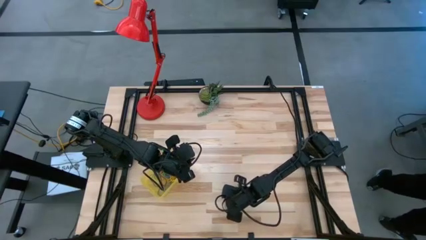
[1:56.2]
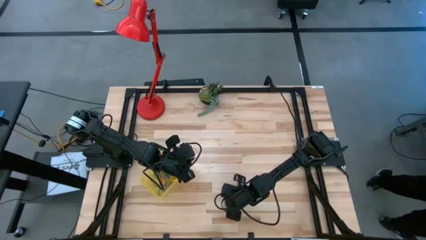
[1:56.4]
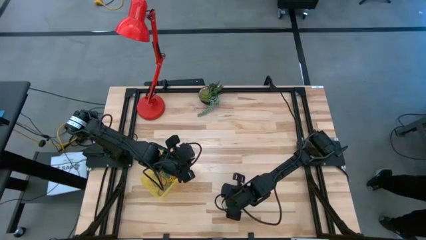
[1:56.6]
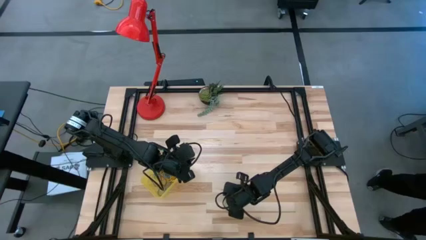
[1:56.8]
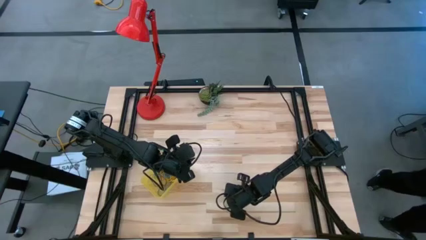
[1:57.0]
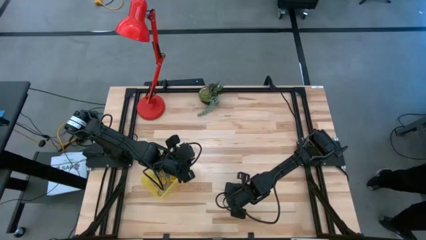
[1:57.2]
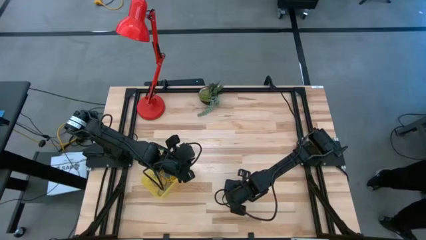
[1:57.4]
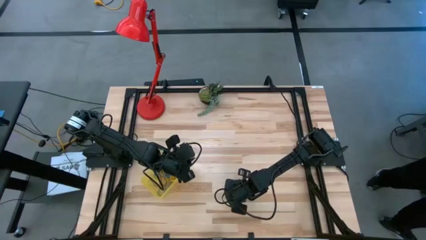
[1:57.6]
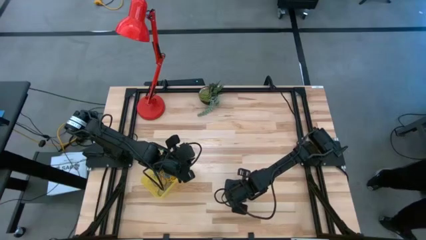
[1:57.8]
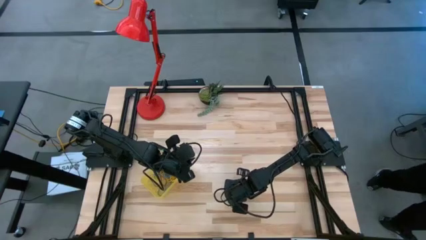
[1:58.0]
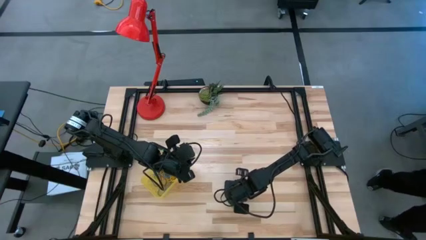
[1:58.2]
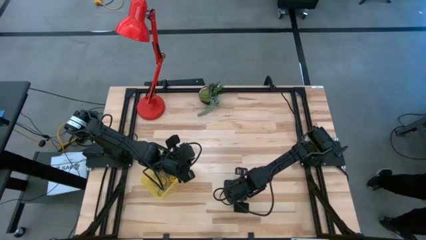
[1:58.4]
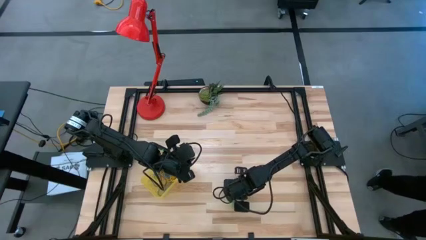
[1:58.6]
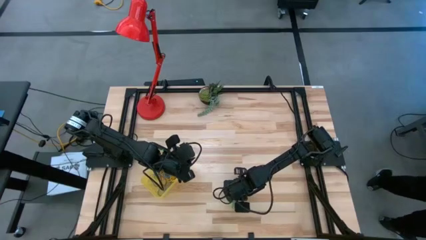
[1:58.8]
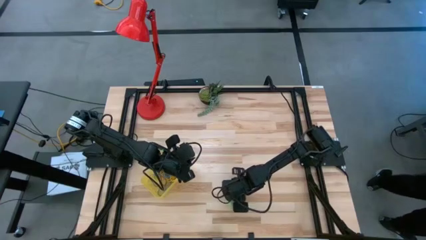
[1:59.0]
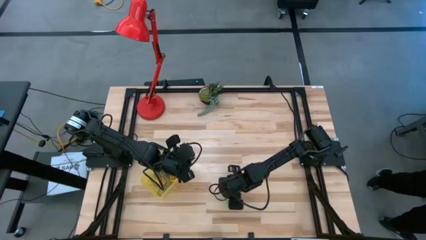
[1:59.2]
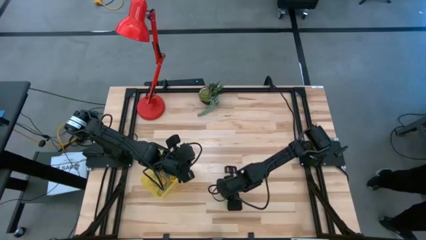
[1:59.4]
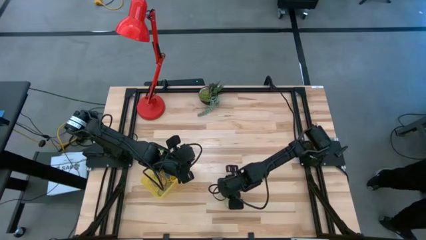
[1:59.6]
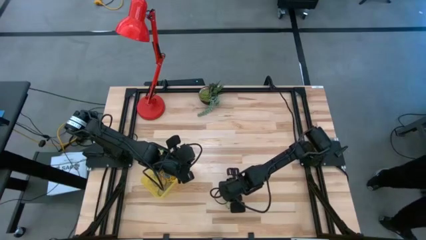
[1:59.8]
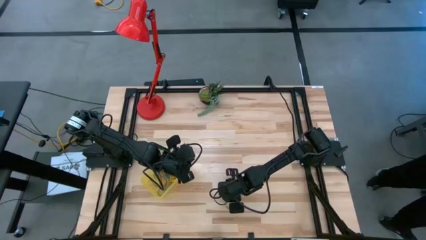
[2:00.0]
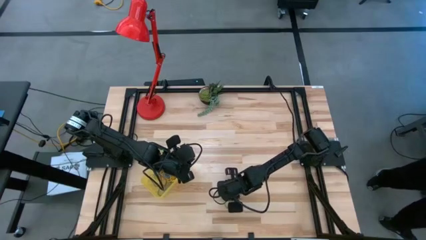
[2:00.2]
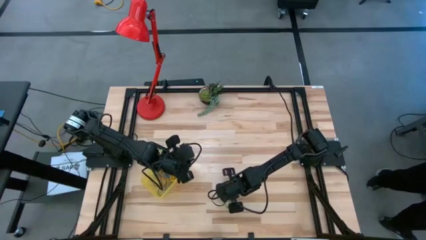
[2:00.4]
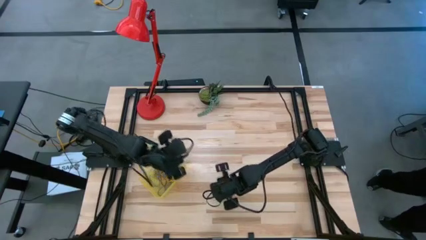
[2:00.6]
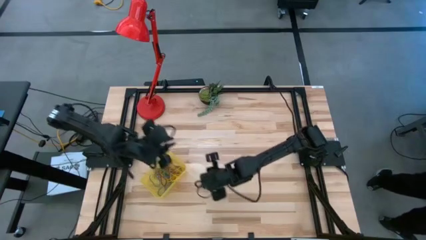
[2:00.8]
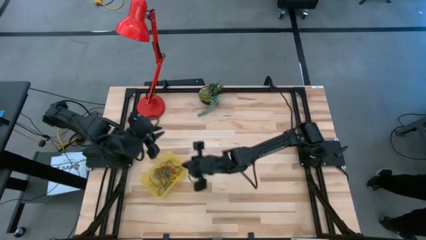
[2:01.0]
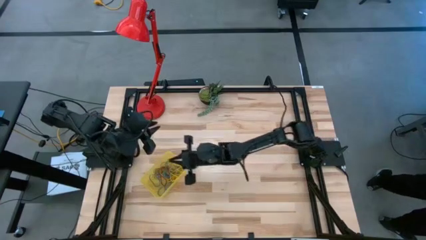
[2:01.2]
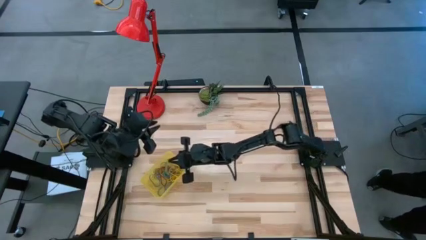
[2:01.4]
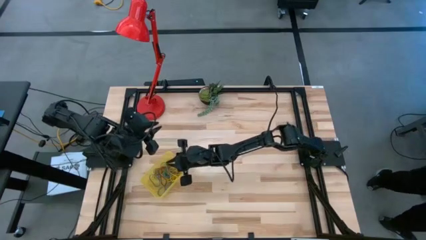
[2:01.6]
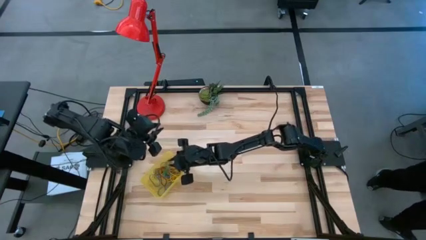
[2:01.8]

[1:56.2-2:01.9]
Task: Pick and place items into bin
Put the green rubber band into the yellow bin

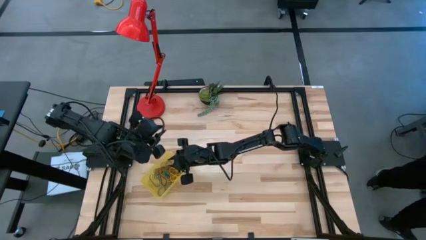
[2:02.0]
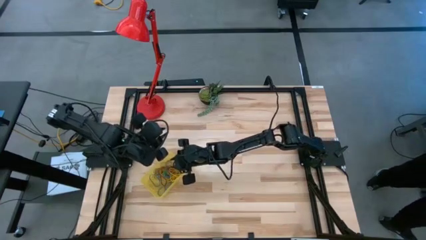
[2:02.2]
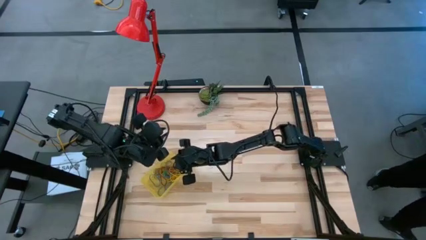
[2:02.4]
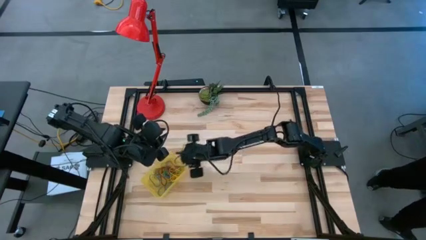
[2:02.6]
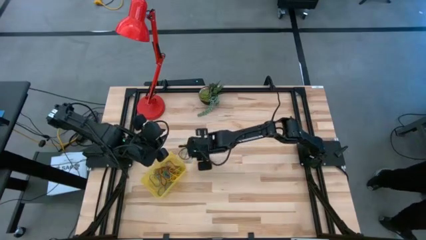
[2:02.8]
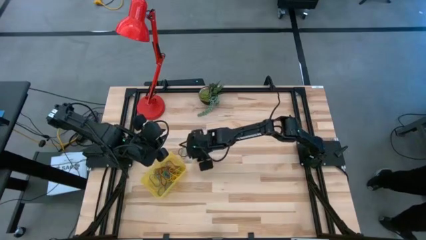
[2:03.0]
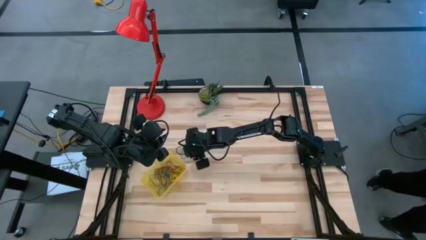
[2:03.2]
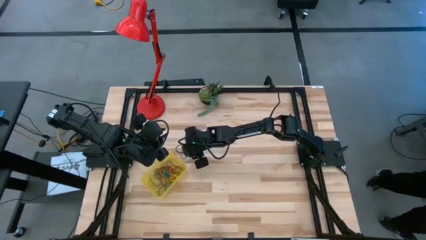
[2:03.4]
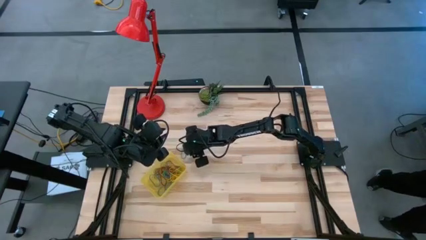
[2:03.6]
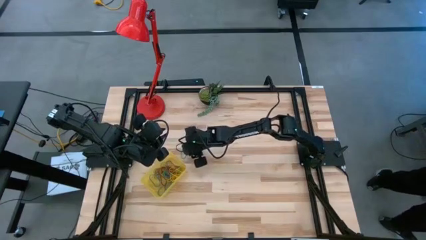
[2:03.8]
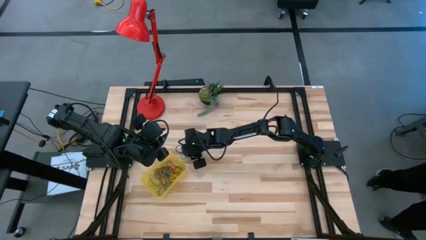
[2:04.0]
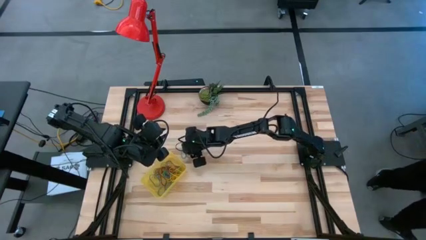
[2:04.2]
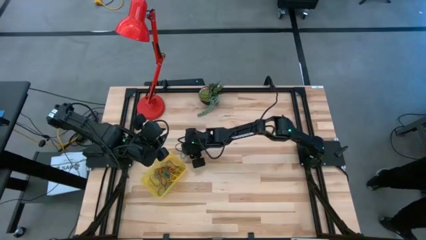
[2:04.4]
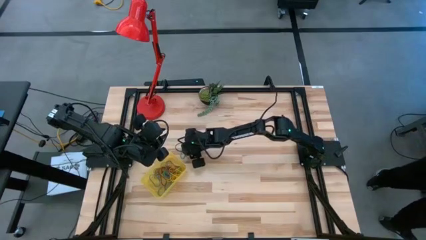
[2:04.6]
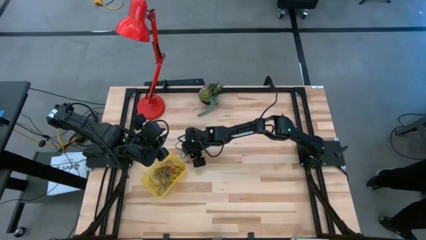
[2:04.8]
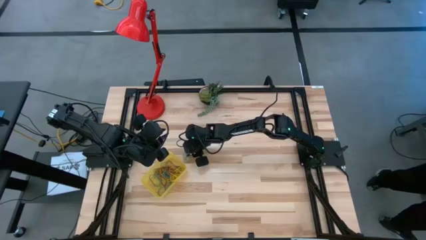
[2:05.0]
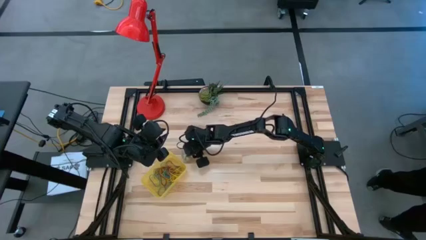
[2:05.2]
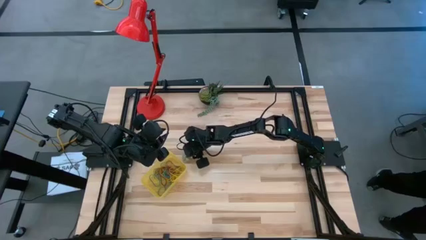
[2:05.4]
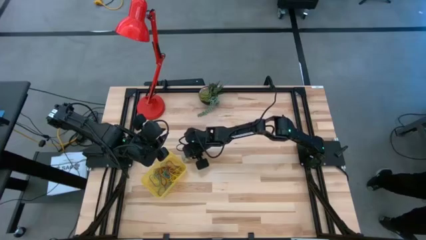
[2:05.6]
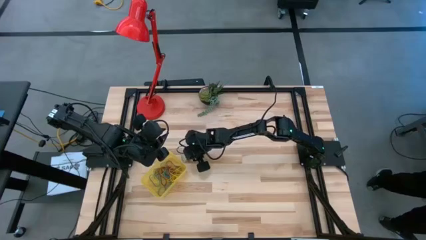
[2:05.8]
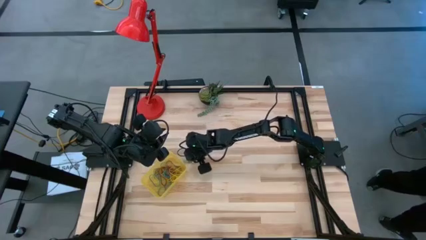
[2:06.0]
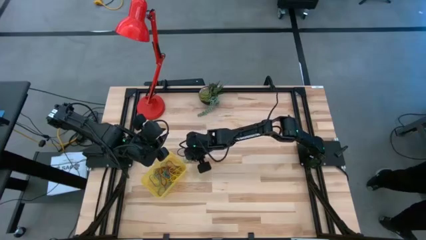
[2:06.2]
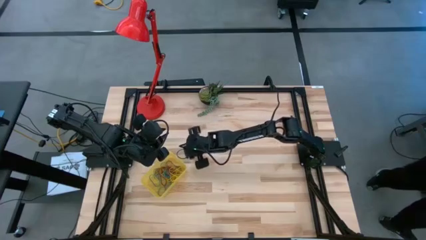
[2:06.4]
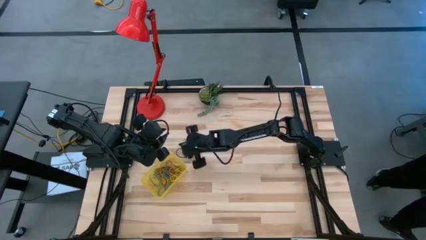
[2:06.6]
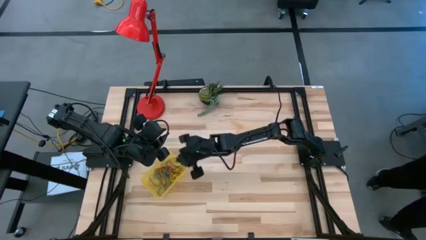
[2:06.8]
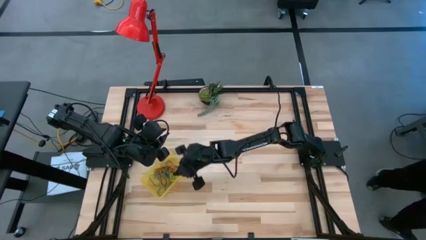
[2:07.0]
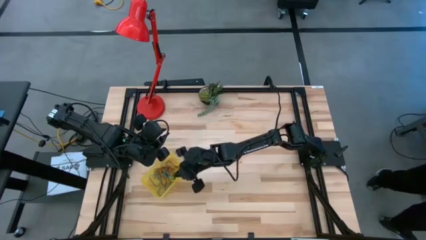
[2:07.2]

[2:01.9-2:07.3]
Put the green rubber band into the yellow bin

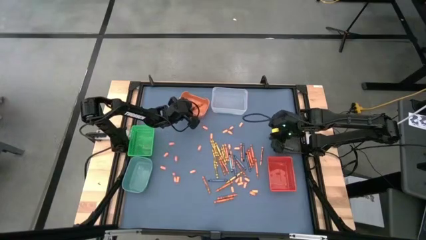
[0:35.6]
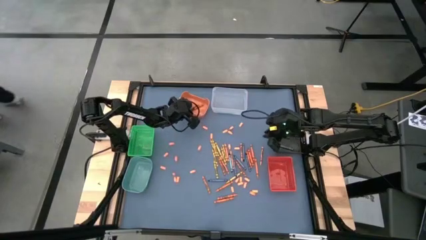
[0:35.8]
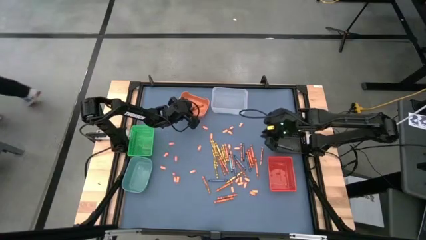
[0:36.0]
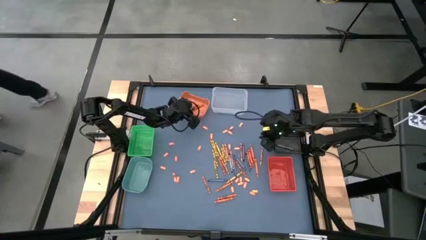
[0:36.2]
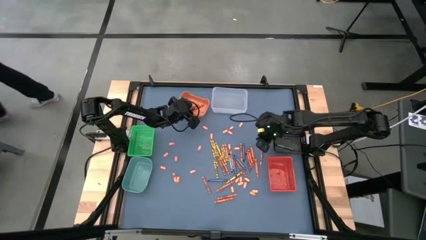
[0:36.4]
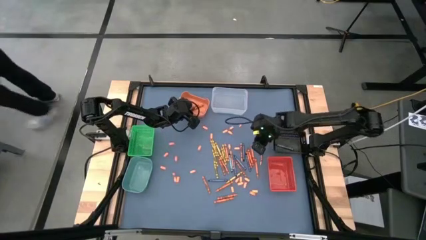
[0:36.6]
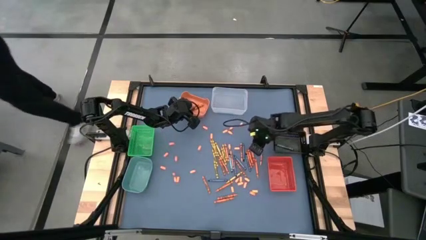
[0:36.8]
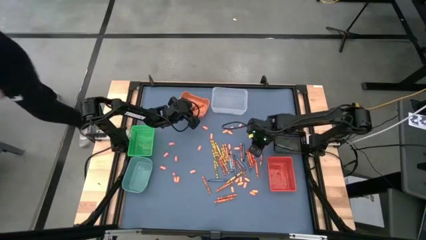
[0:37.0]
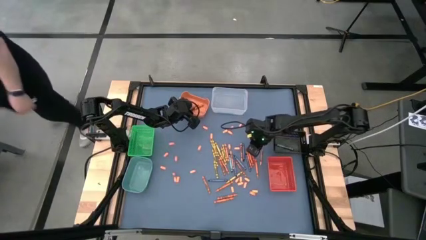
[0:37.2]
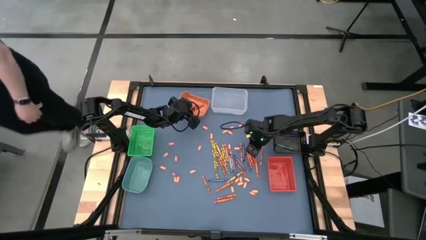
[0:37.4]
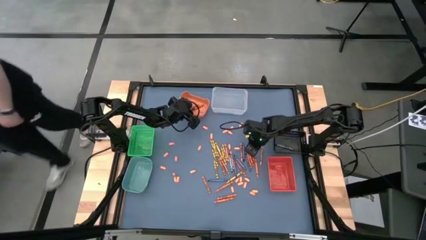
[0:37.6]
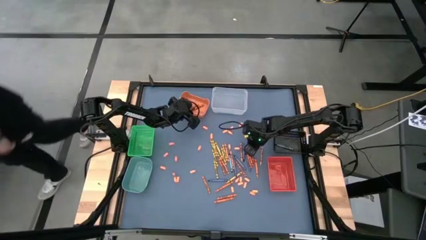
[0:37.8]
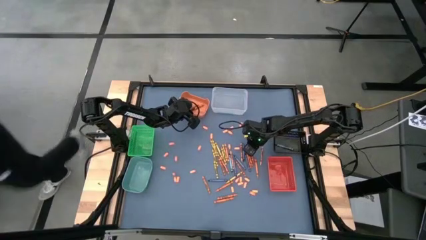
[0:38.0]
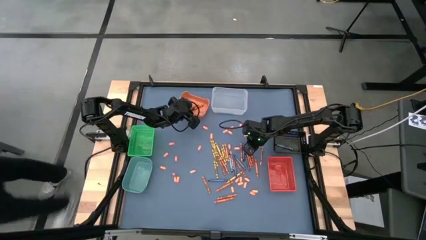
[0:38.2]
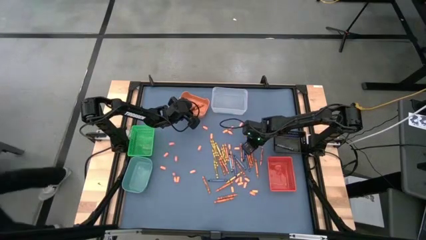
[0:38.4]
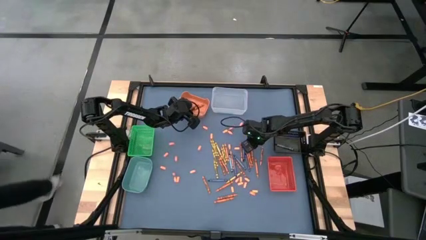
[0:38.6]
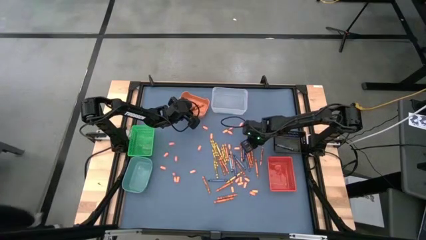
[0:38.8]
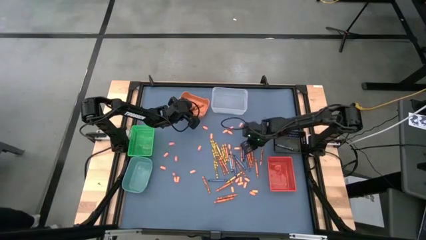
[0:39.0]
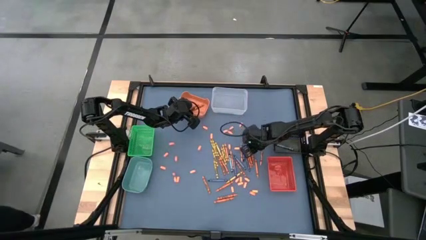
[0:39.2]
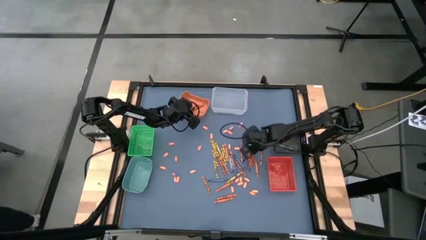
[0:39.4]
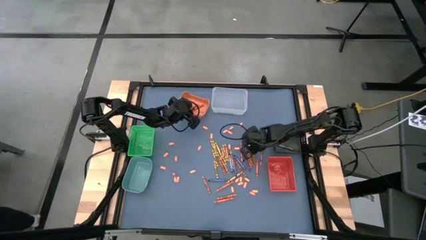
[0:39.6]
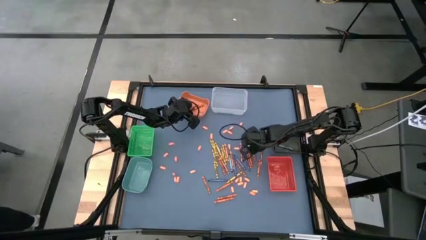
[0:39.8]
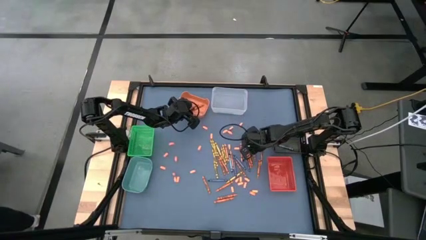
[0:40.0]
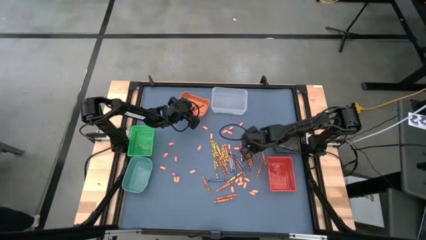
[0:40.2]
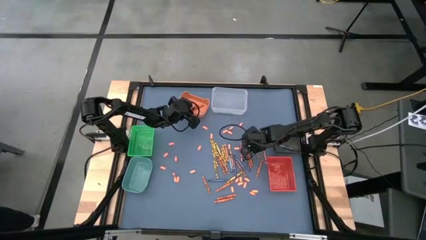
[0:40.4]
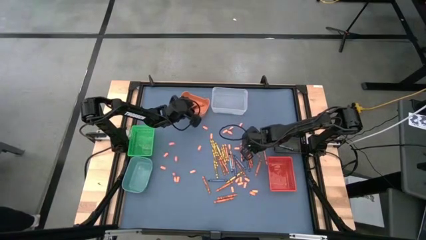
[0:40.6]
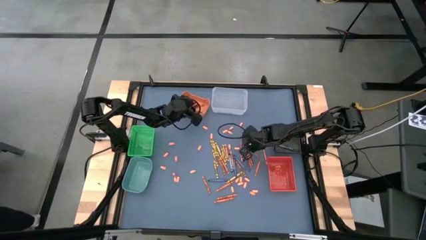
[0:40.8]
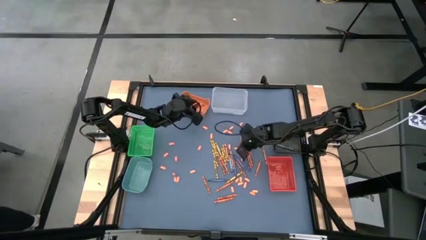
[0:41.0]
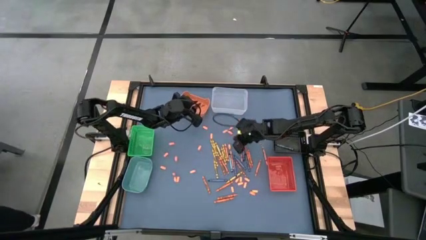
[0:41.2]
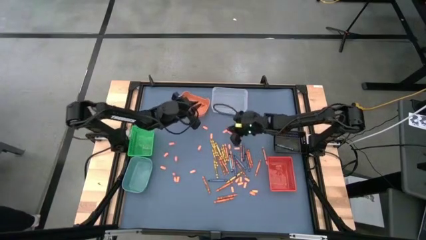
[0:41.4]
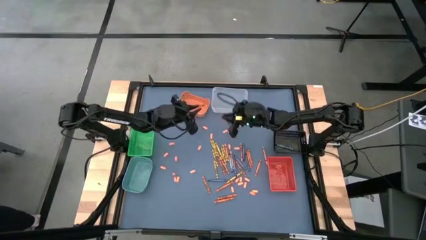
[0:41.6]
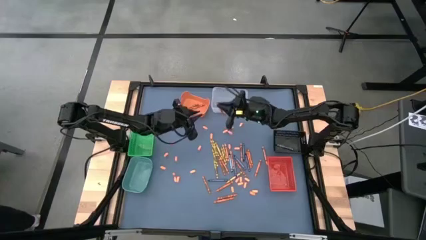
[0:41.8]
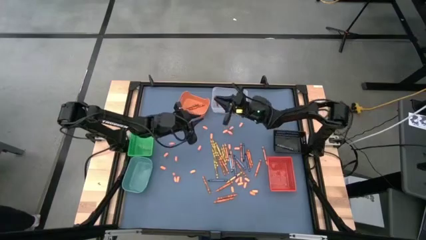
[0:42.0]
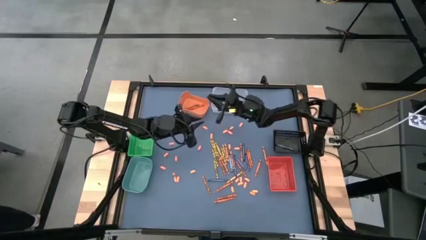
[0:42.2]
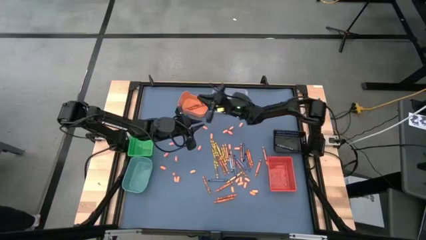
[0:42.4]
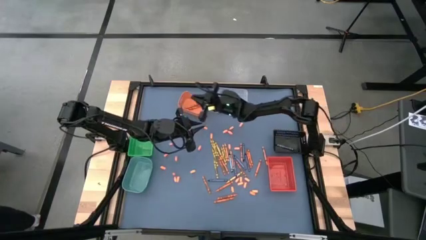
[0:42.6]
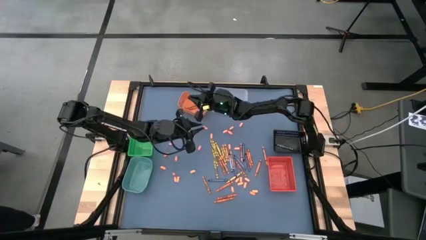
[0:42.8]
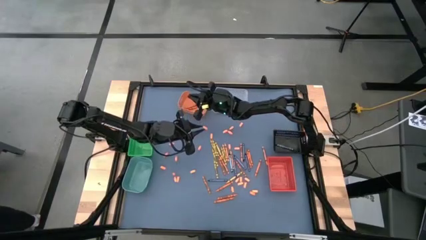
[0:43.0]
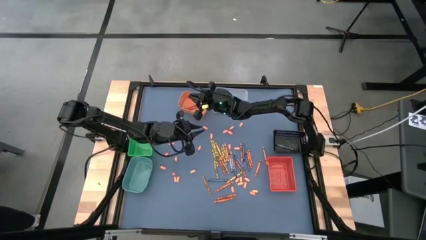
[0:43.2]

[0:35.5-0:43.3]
Task: Sort crayons
Put the red crayon into the orange bin
